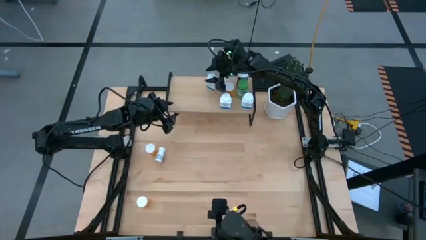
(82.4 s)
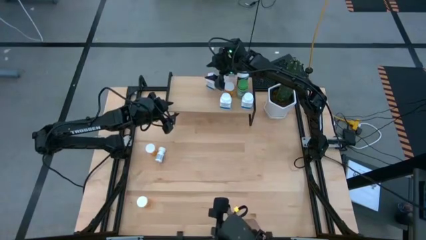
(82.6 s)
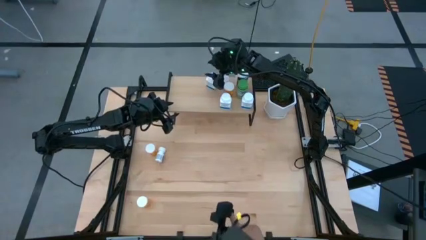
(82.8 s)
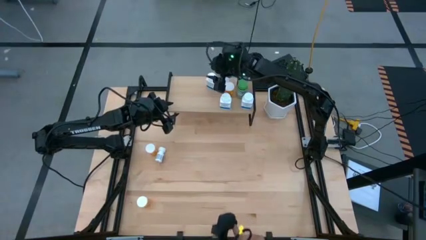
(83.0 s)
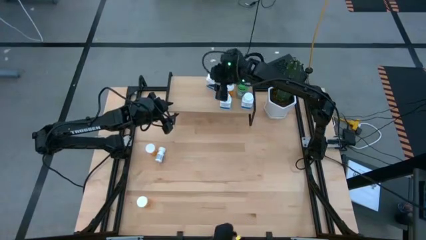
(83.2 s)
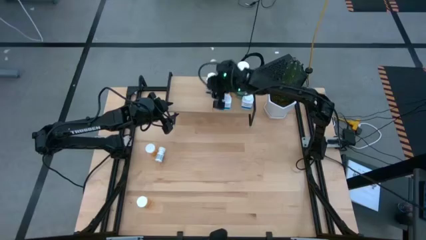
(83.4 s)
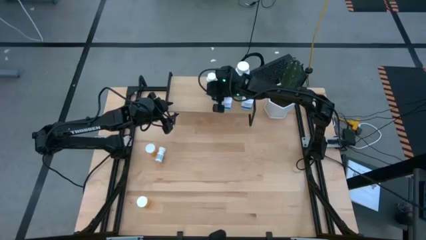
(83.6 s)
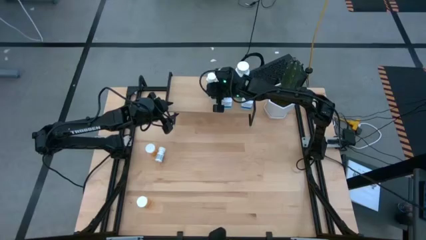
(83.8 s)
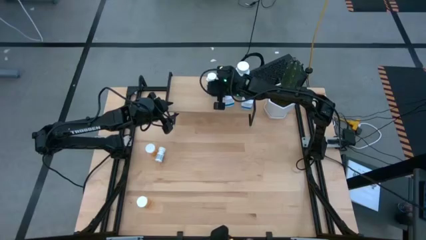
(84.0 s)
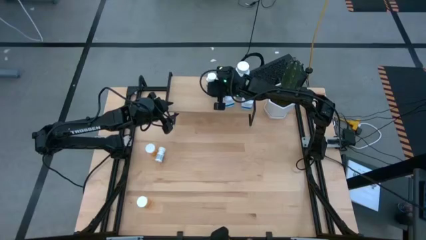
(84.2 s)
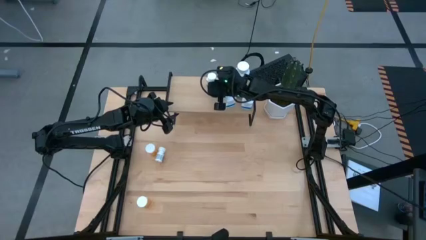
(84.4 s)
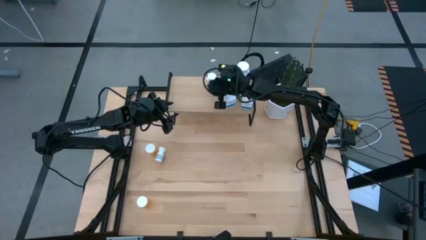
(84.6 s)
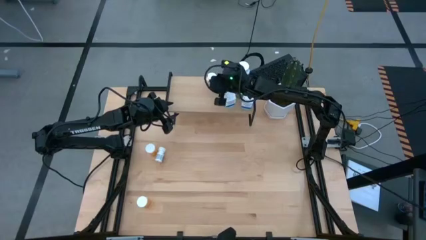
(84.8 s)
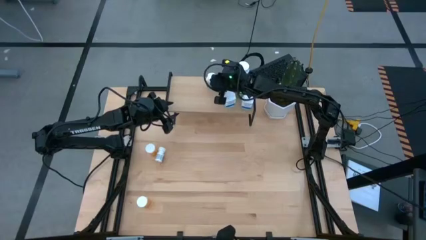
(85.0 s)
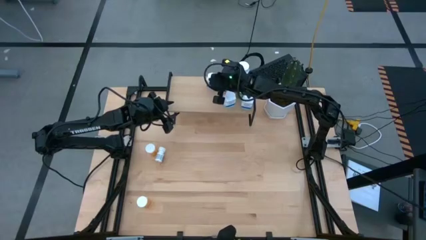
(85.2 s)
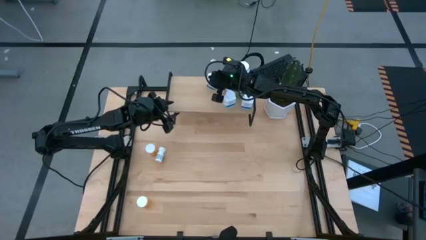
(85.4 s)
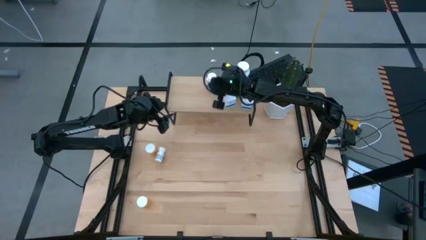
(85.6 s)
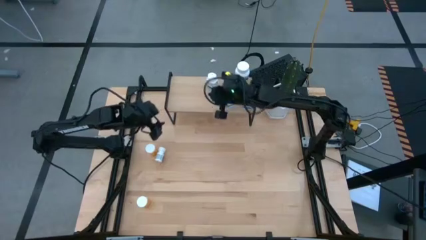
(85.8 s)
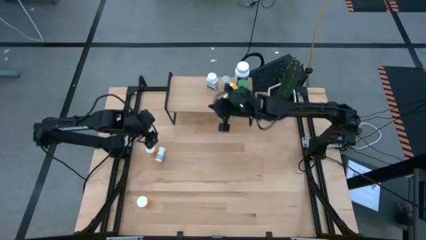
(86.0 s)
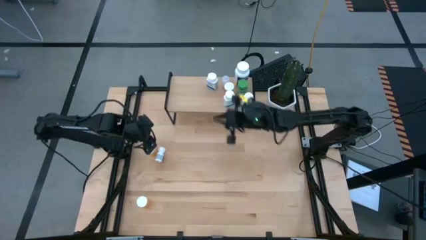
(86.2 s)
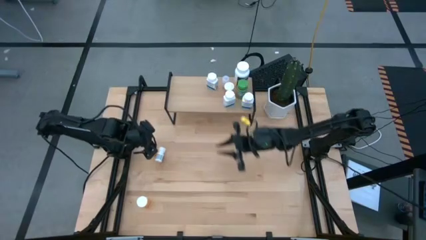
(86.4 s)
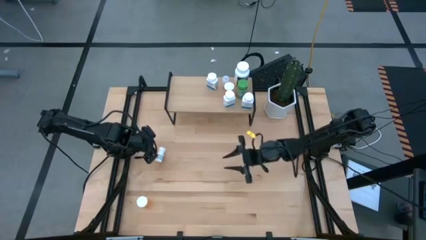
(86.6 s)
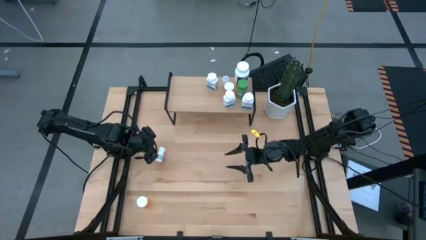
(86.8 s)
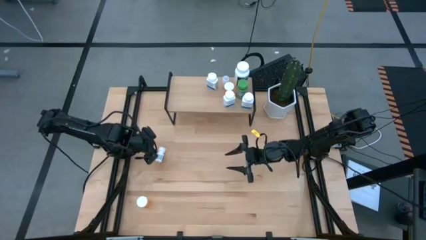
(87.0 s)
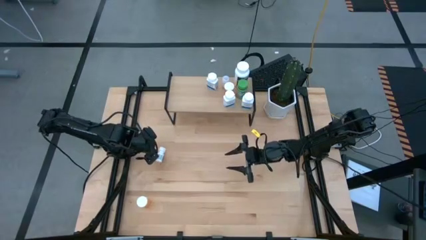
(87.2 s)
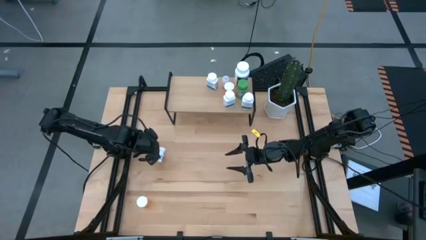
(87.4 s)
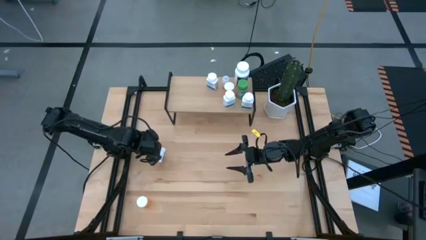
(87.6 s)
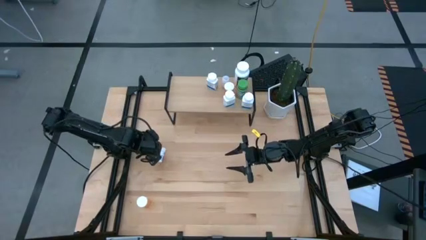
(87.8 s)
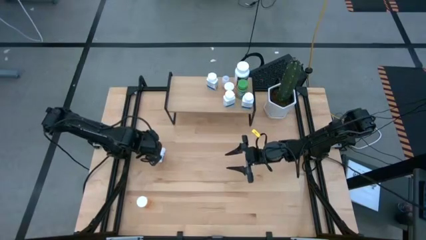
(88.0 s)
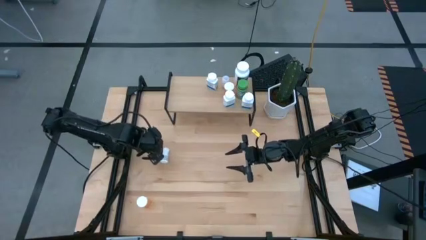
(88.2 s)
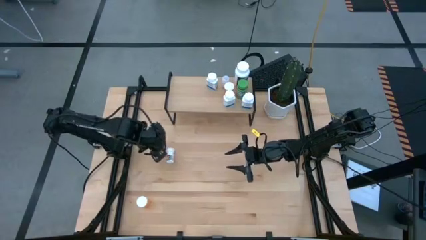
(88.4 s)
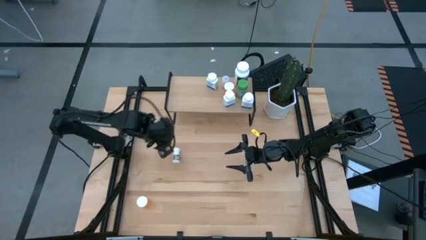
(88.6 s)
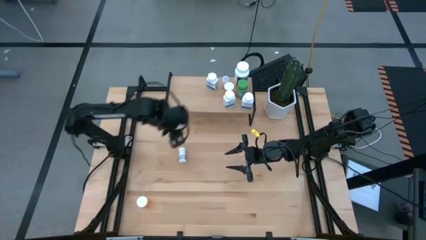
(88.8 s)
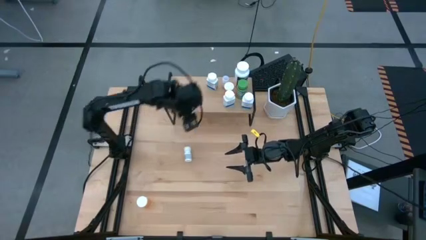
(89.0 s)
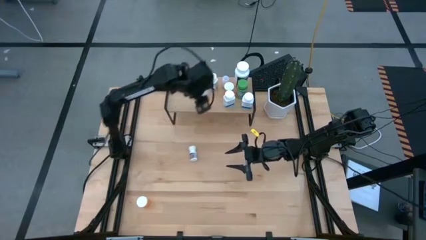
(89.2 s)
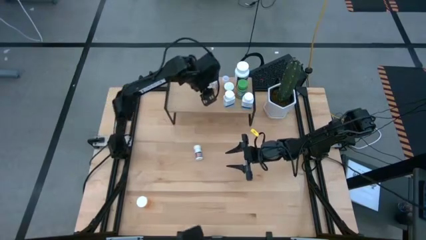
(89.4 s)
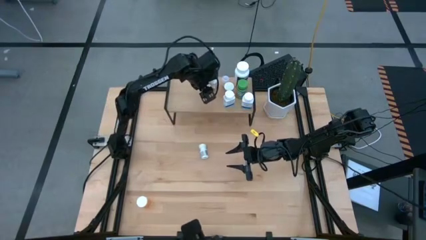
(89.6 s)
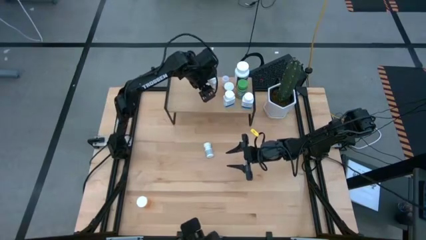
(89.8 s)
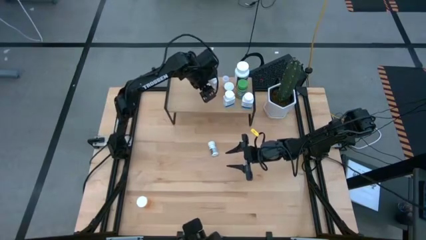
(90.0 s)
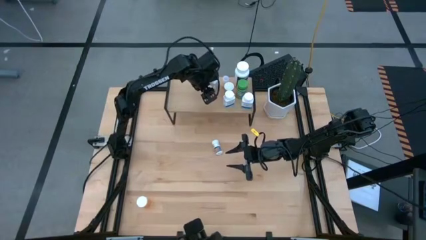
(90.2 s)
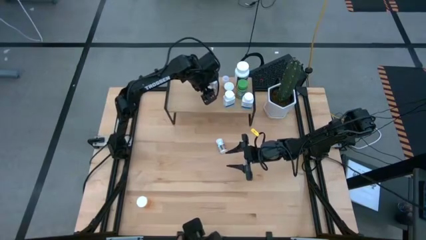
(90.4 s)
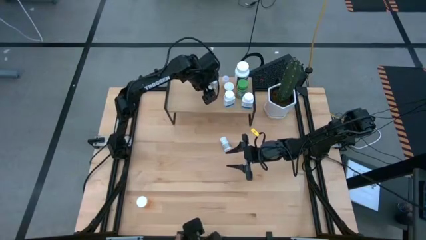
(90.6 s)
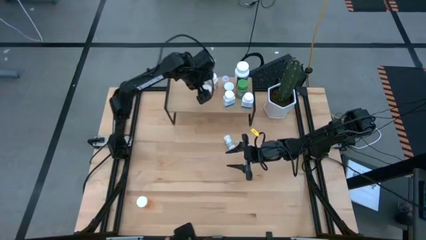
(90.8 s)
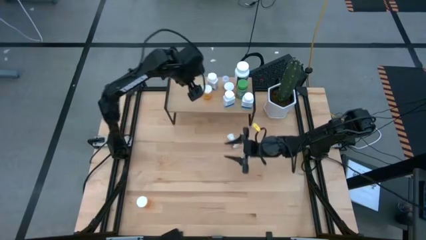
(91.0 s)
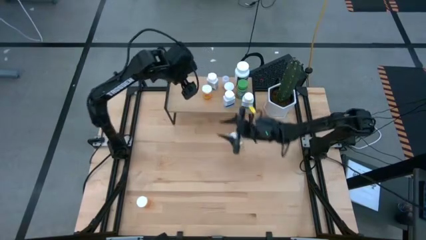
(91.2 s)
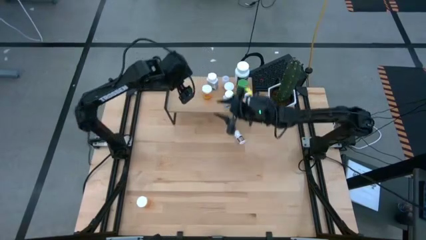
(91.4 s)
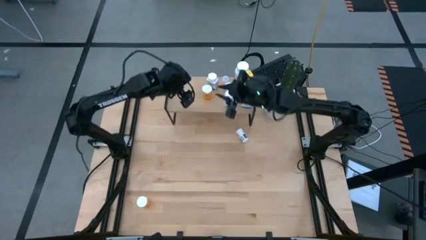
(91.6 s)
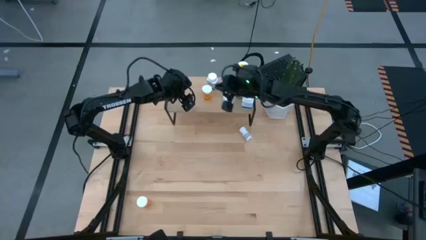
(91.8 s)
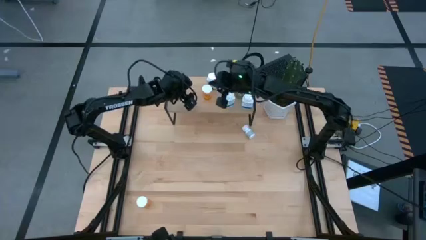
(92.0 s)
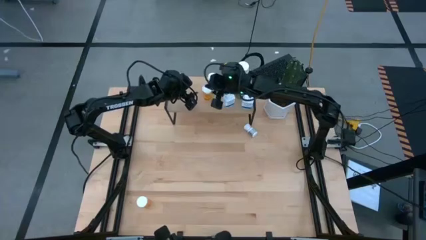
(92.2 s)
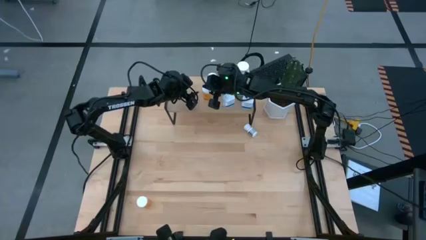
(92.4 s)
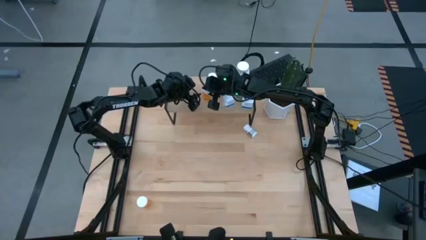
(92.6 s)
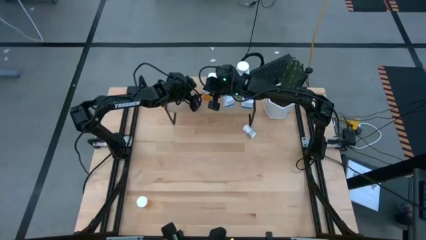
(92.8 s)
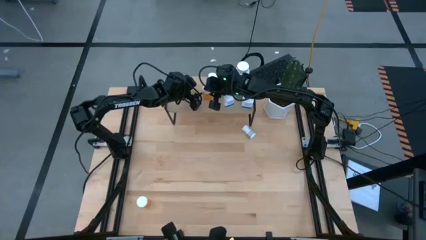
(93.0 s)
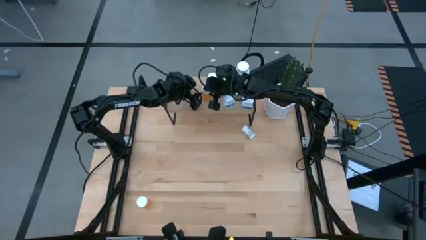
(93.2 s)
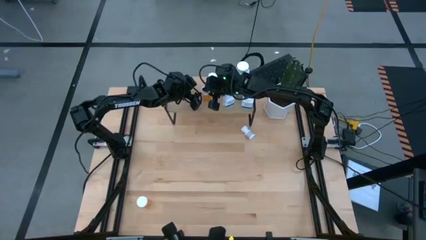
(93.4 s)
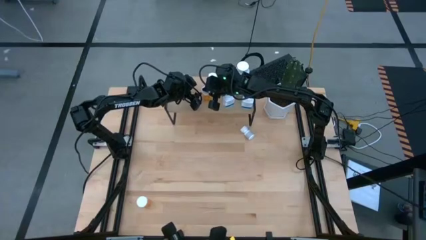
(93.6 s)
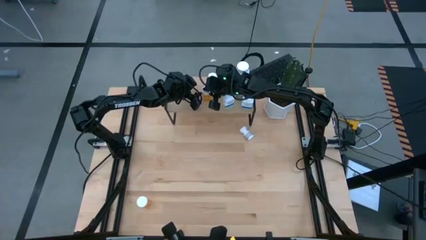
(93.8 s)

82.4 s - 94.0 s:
Task: Pick and place medicine bottles onto shelf by color
Put the top orange pill bottle on the shelf

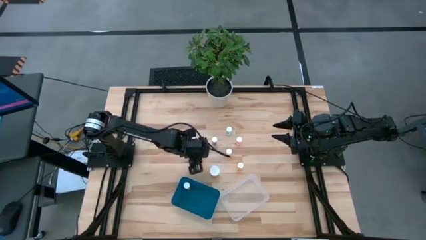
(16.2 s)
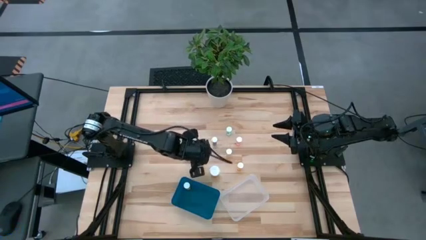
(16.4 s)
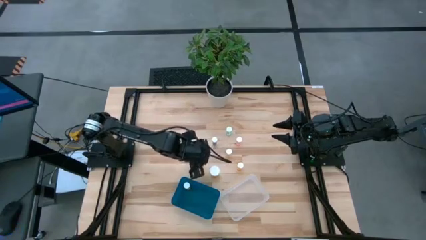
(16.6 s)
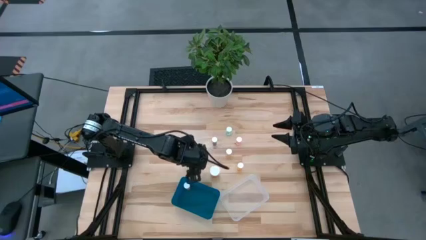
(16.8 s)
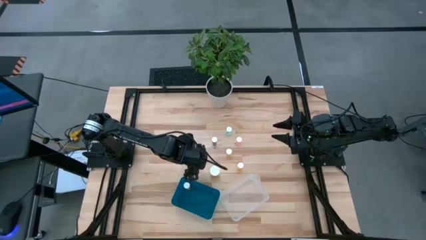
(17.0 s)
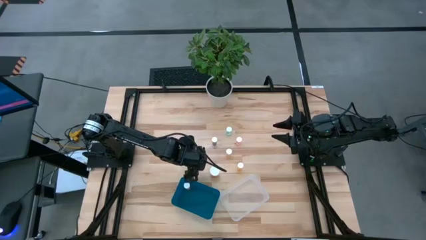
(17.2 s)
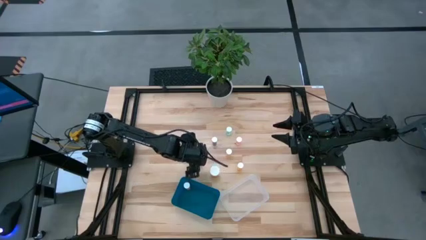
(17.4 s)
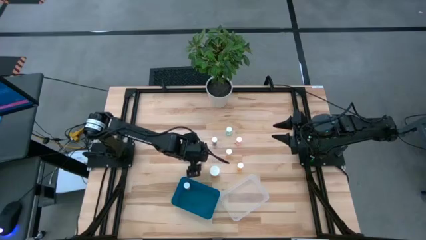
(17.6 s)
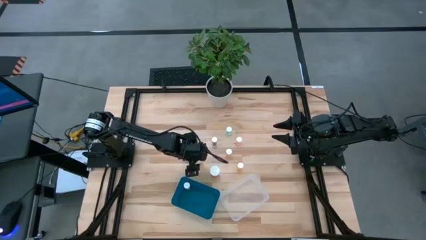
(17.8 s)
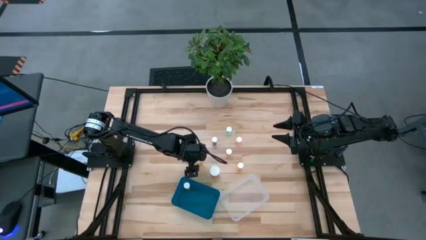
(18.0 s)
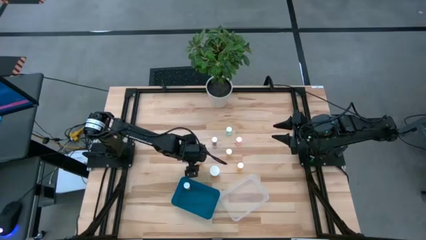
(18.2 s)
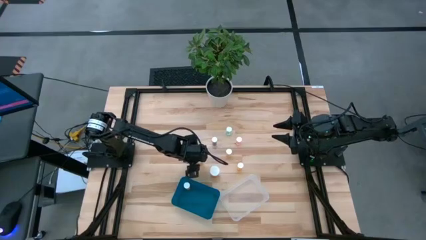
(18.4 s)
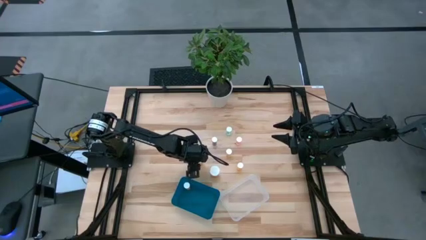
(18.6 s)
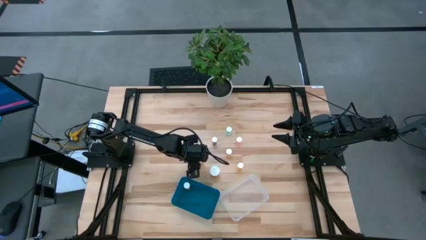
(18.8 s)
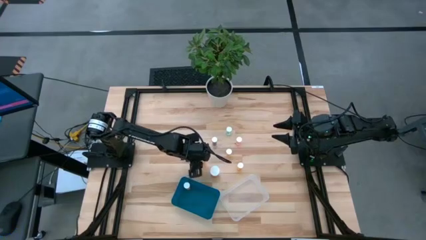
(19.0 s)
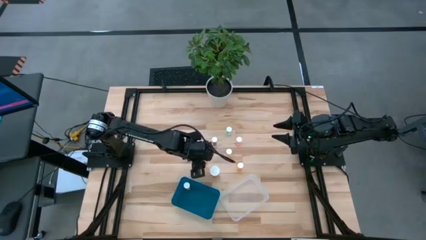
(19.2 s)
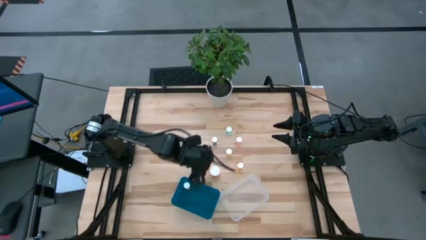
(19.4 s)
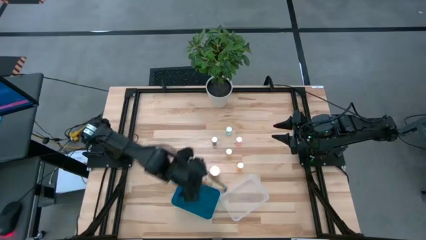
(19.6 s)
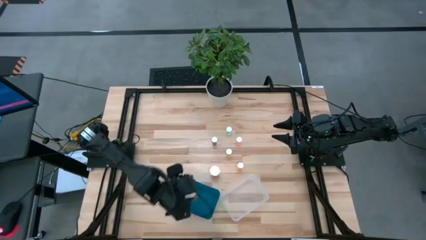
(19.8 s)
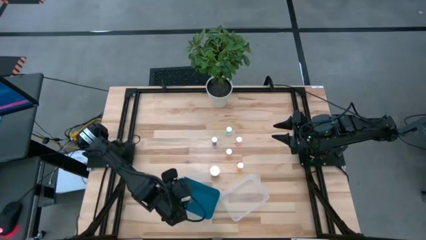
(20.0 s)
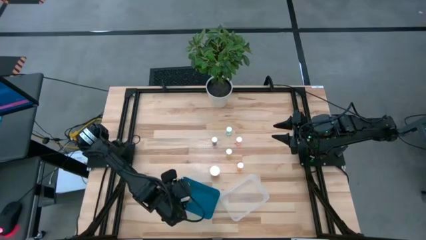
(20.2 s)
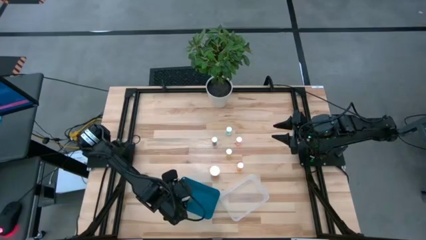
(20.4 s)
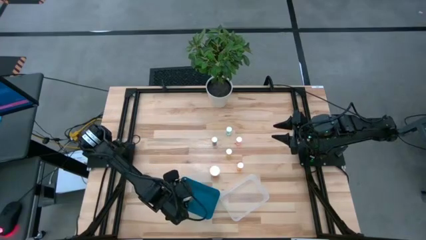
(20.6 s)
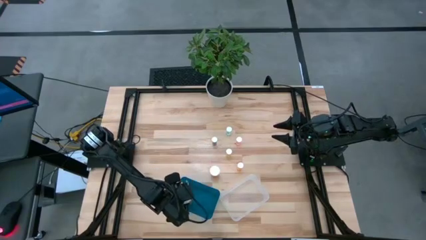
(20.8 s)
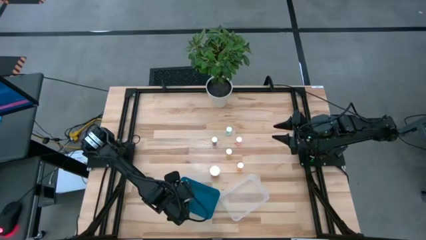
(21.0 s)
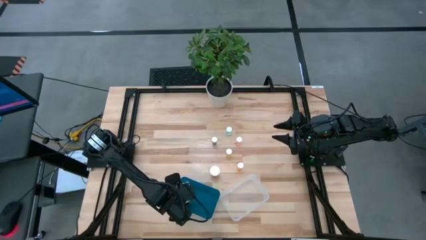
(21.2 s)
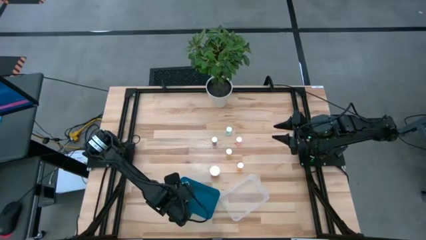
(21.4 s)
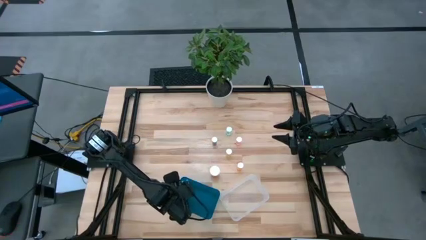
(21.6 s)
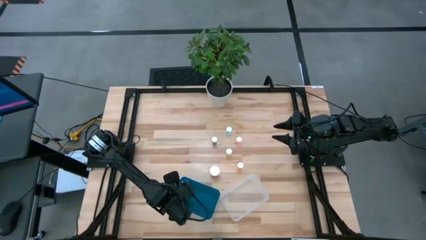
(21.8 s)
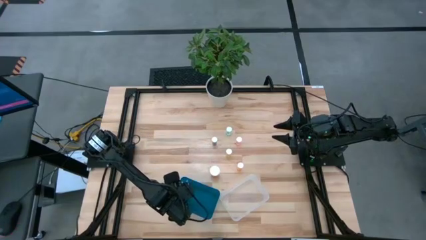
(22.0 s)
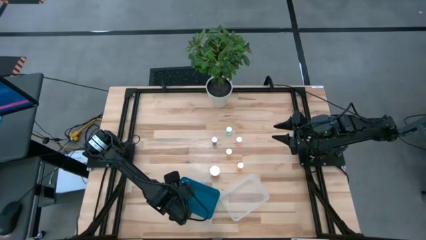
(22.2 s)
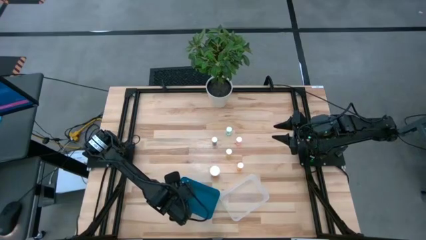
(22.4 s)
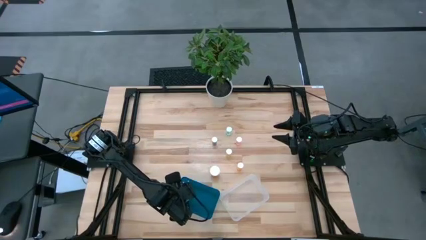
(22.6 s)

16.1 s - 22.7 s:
Task: Pick and place medicine bottles into bin by pill shape (circle, oval)
Put the large orange pill bottle into the blue bin
